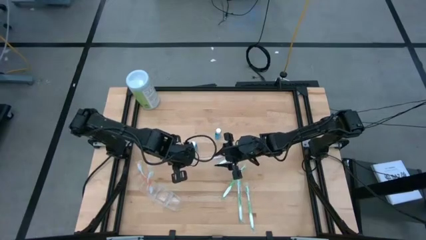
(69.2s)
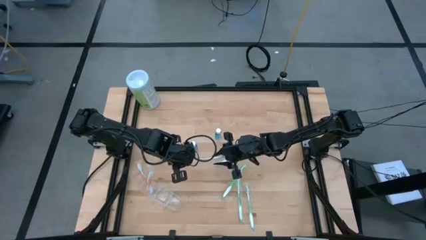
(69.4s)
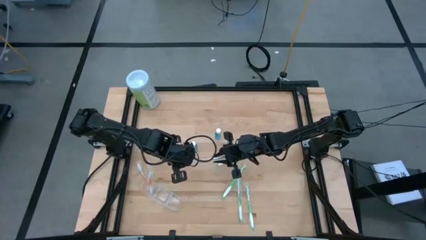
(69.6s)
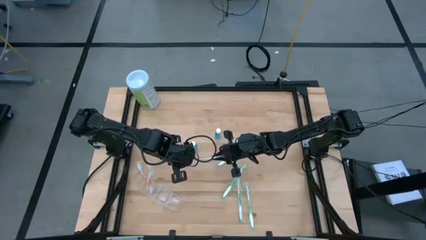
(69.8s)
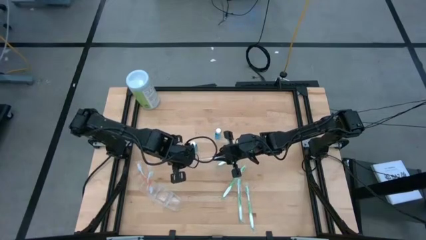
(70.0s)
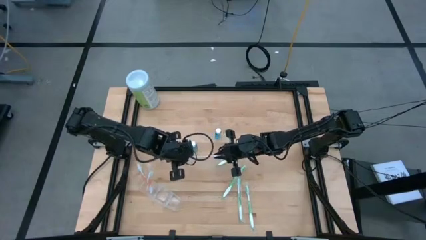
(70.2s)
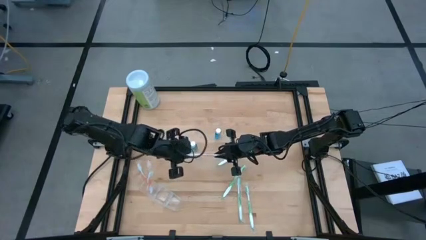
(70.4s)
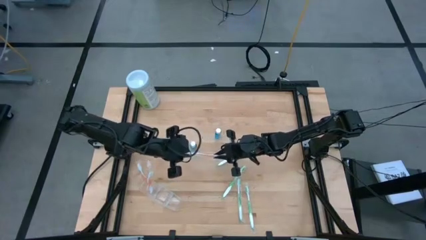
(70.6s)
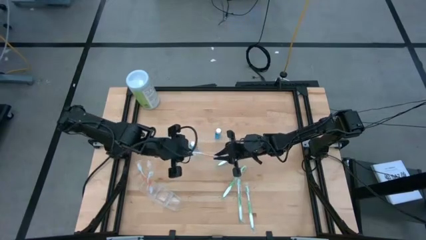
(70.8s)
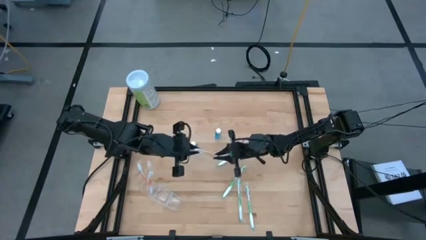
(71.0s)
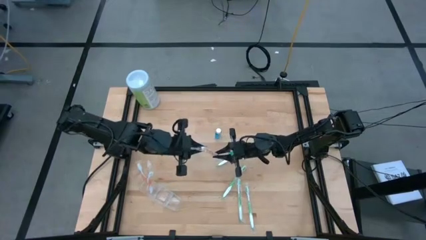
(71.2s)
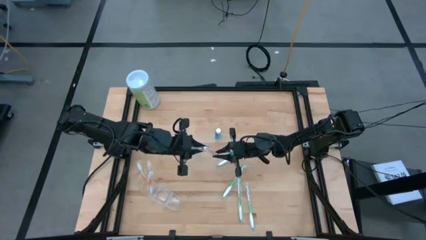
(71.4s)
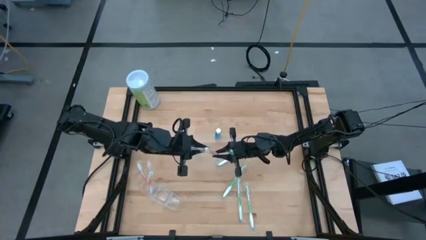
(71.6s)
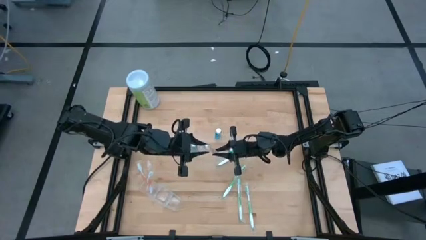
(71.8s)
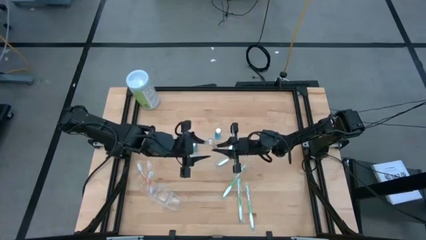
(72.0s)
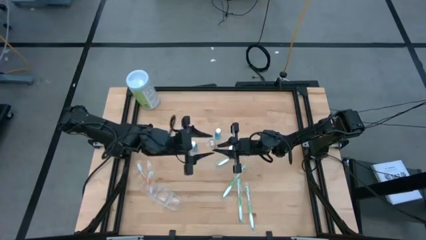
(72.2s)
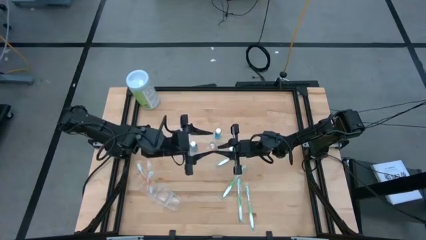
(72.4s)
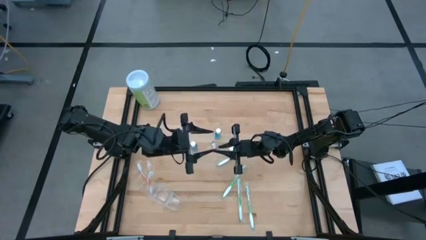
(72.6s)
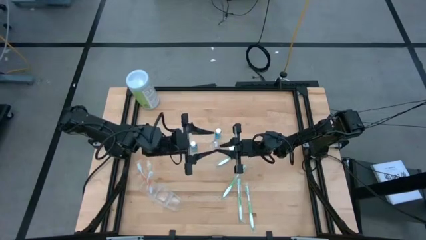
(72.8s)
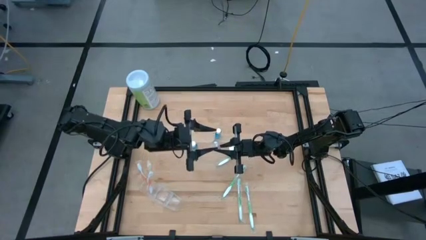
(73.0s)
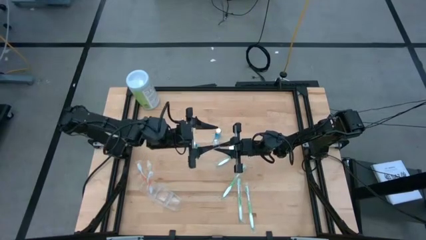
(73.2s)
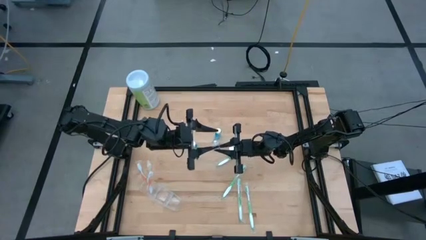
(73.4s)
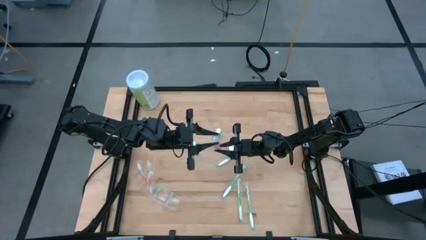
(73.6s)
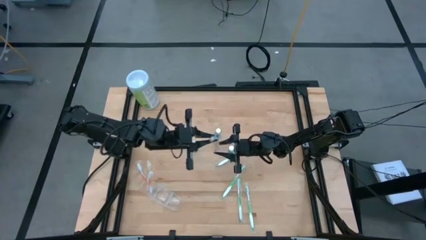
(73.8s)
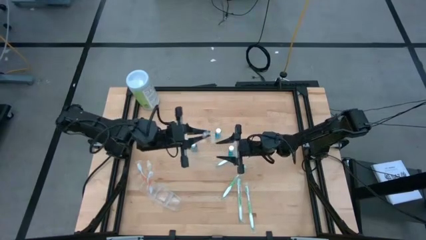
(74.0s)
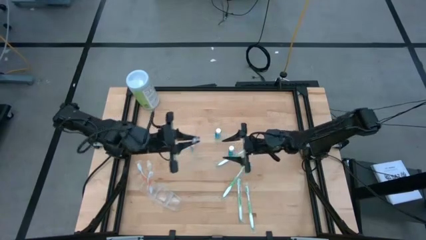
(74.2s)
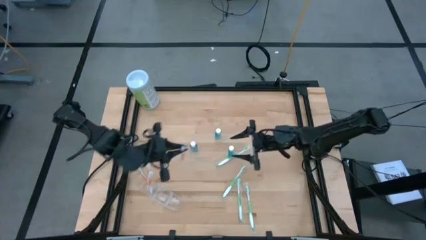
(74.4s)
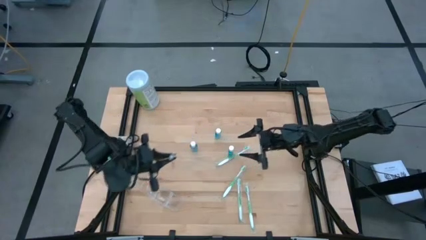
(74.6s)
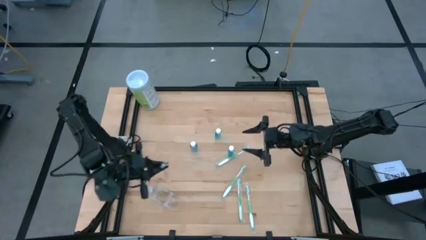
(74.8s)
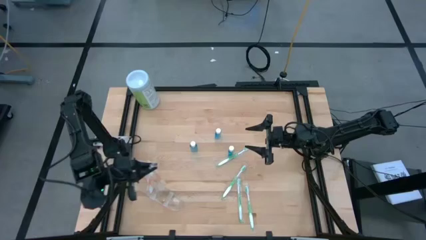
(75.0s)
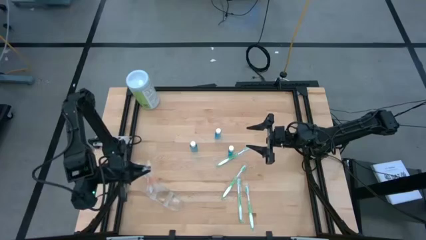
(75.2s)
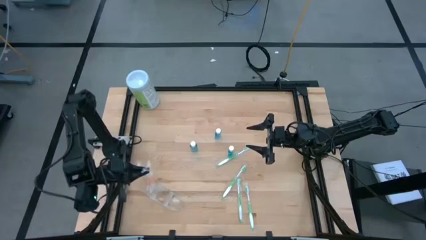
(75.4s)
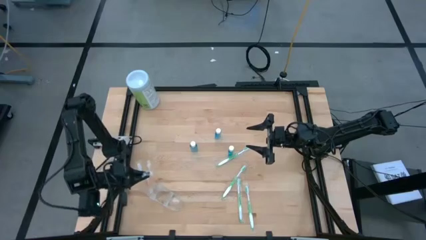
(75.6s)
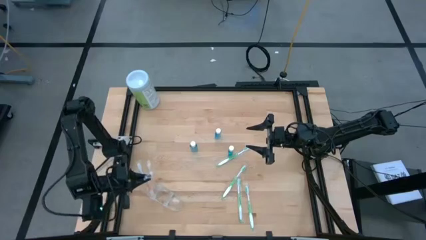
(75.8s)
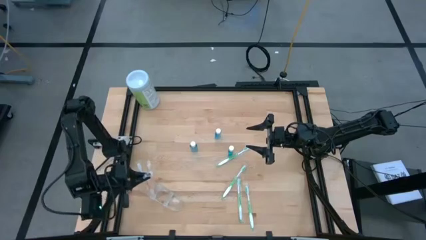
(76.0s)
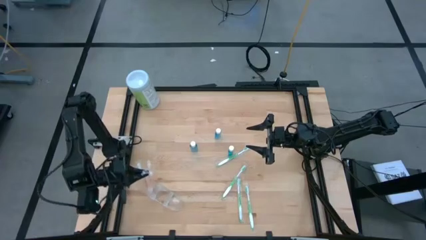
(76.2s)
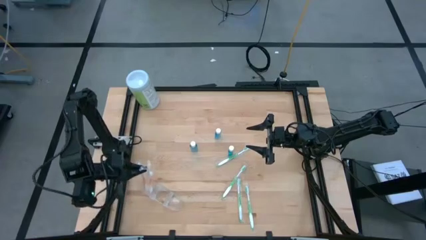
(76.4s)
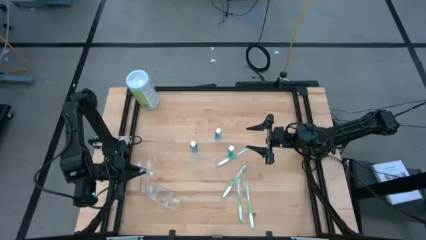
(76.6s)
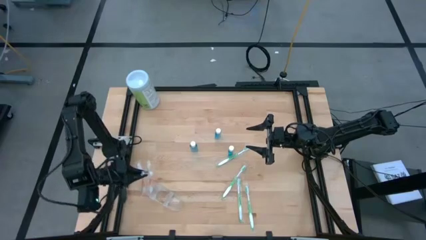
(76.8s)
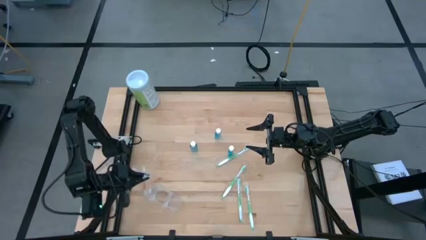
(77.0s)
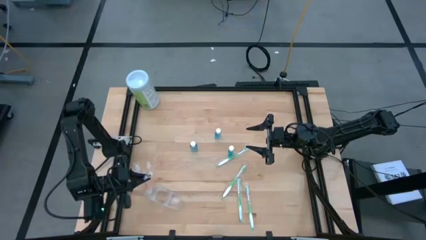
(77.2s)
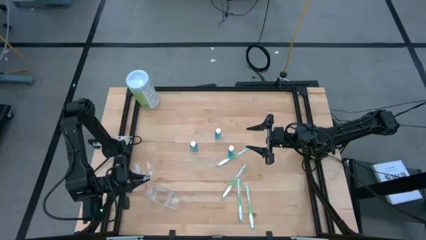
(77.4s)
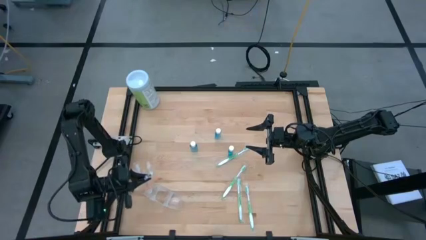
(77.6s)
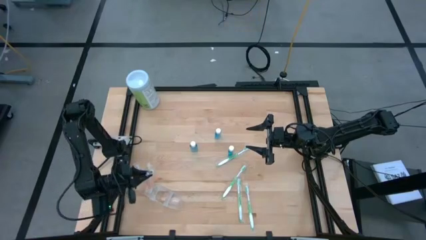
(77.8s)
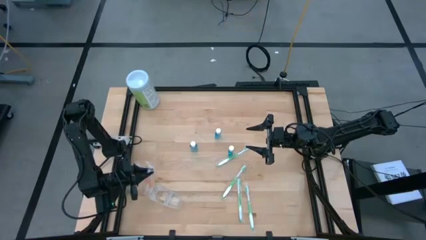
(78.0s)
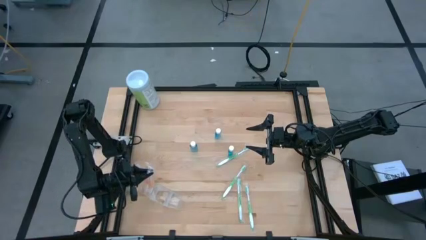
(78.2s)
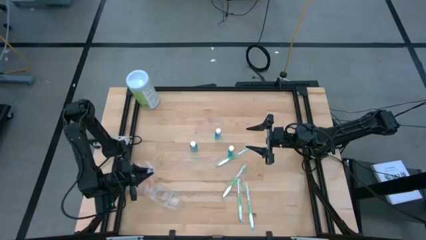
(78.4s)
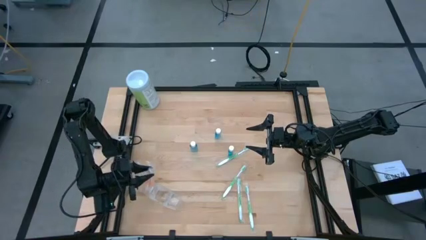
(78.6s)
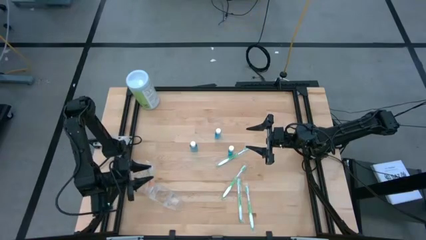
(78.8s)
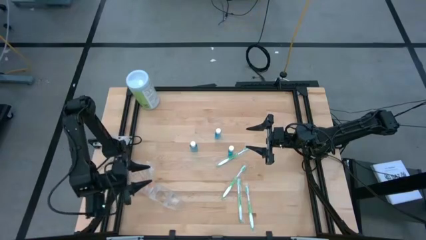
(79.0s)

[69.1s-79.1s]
Task: Pick & Place toothbrushing station
Put the orange toothbrush into the transparent organizer

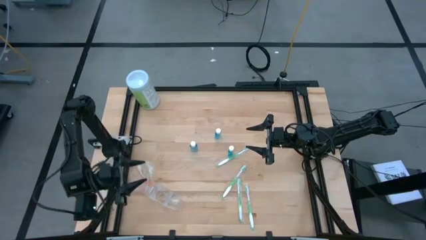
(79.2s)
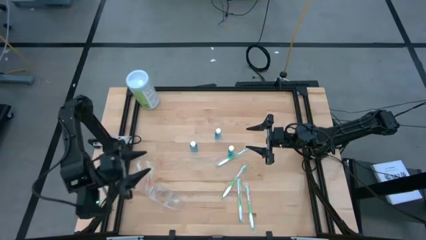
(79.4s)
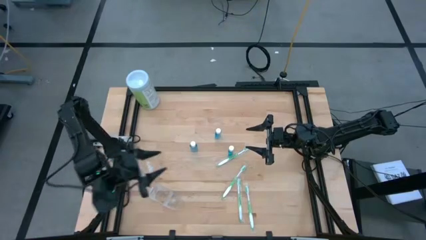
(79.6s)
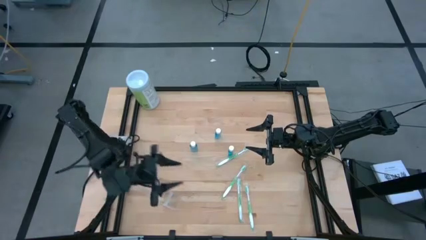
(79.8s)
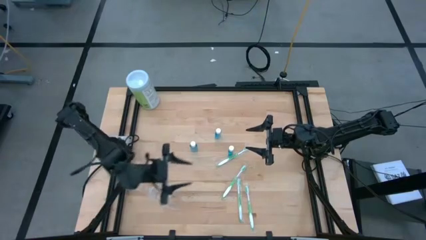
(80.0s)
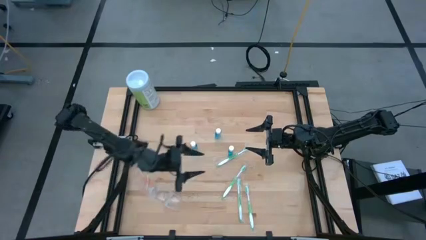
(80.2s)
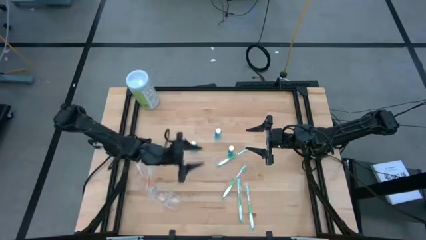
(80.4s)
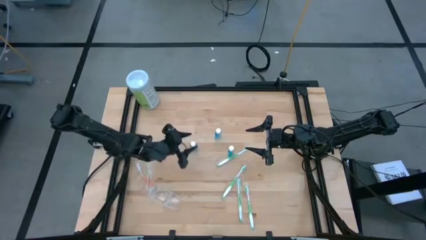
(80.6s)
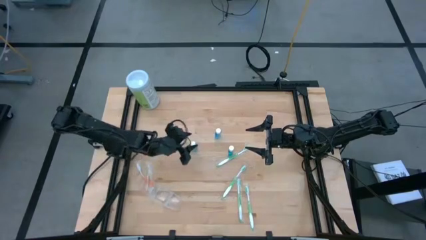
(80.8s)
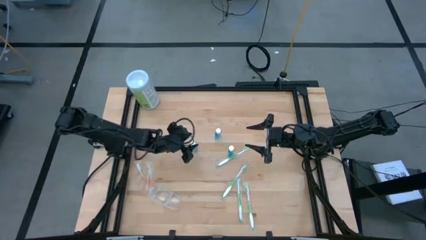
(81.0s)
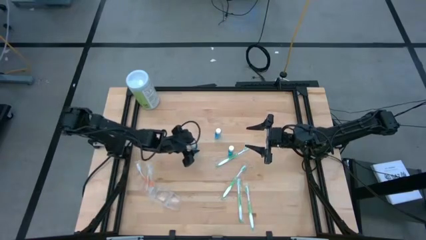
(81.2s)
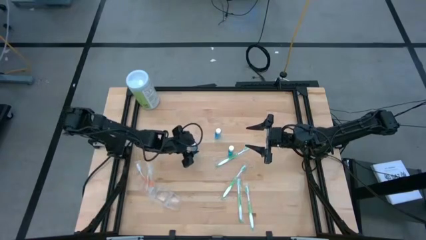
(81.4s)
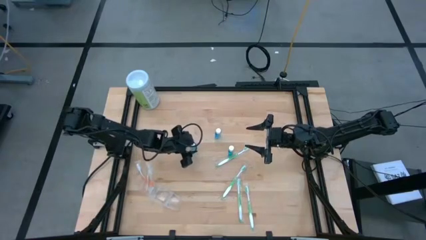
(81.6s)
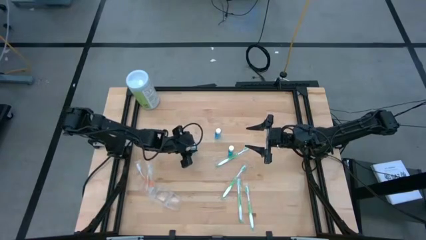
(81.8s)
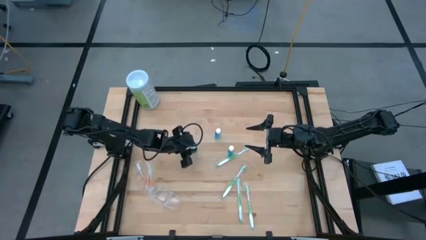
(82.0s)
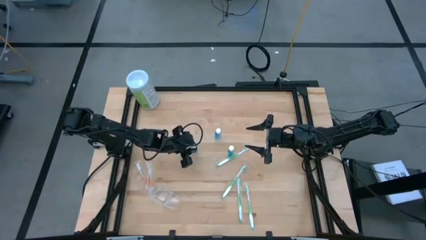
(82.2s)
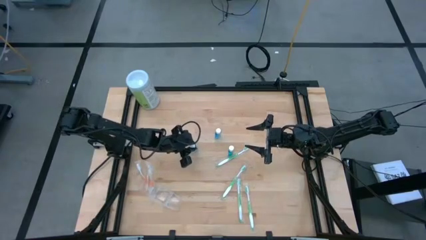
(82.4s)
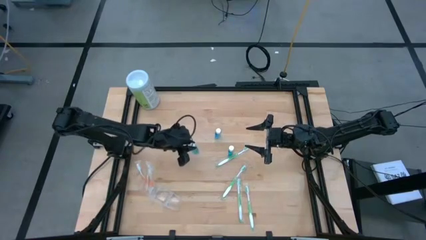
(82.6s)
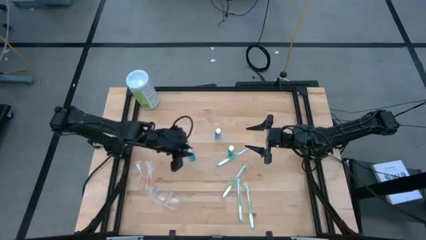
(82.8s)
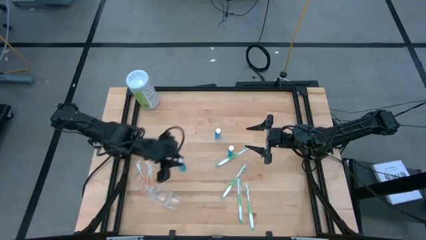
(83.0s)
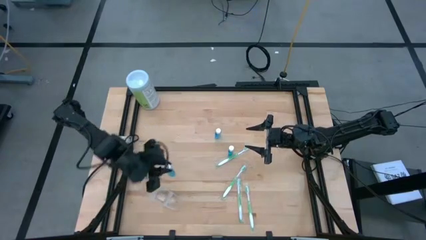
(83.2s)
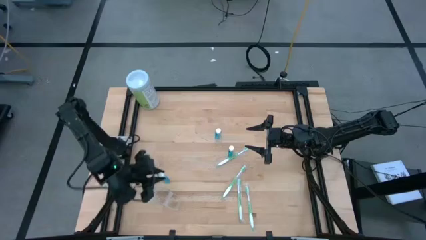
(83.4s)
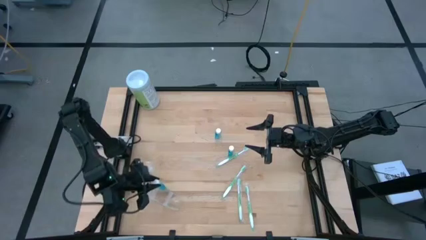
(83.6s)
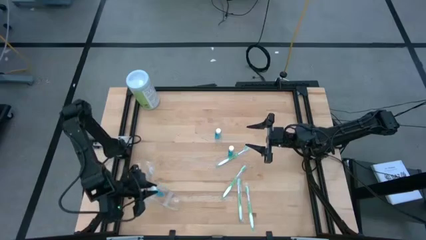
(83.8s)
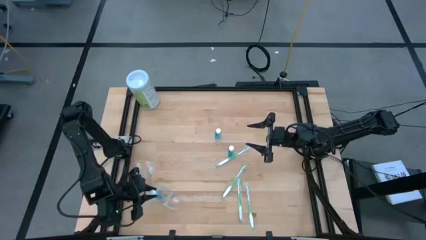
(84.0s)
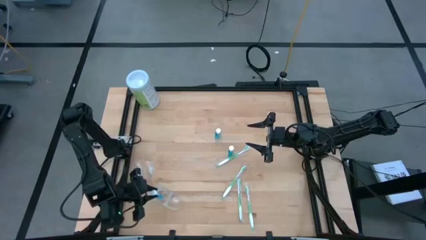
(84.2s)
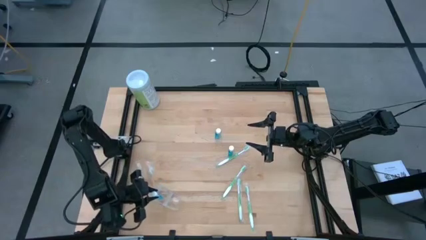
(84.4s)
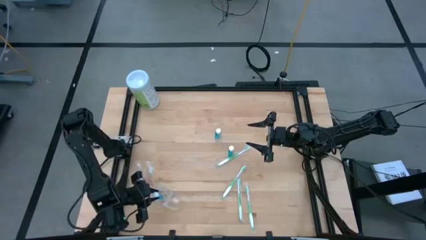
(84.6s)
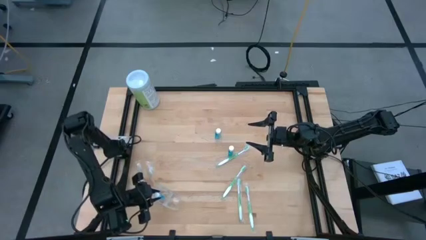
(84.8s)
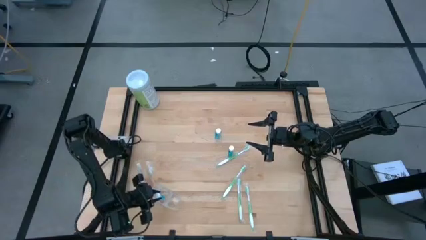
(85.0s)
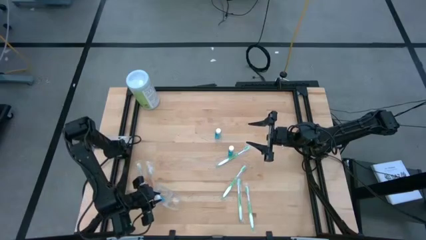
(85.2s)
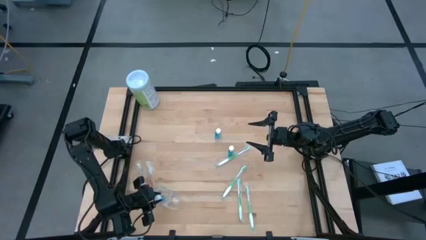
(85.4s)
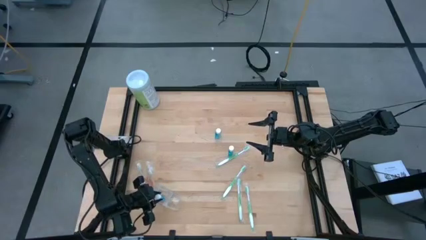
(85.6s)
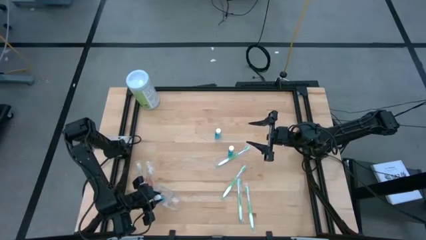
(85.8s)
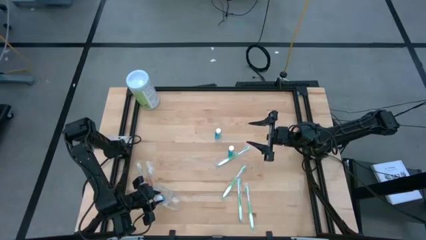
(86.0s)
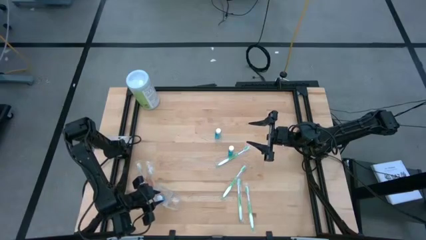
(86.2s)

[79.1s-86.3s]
Put the blue mouthwash into the transparent organizer
